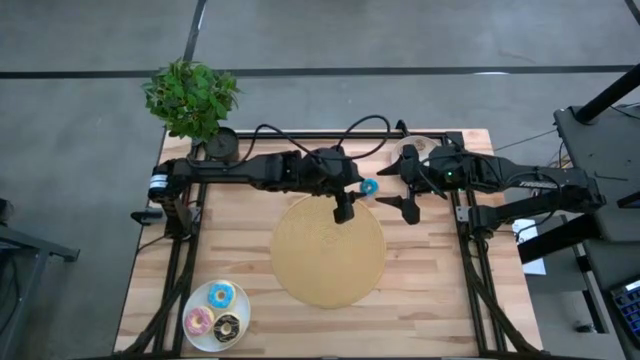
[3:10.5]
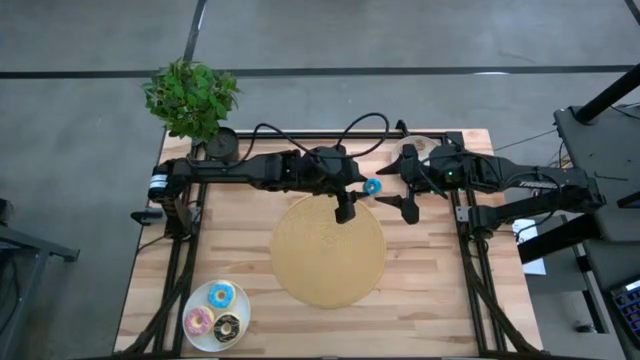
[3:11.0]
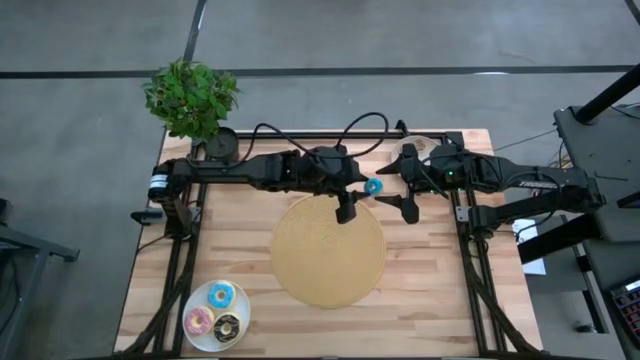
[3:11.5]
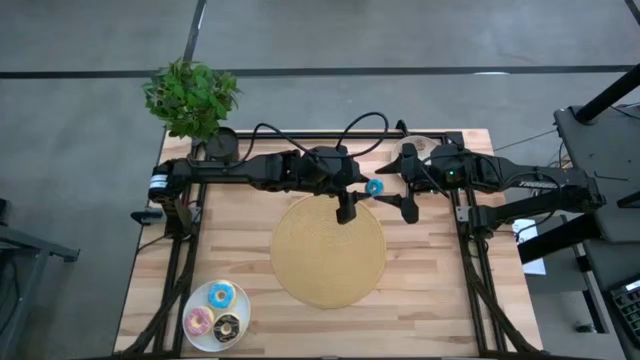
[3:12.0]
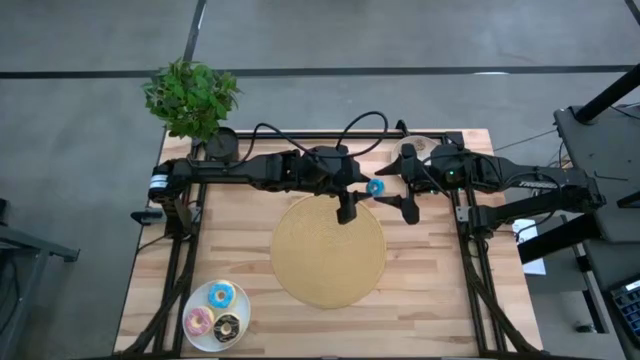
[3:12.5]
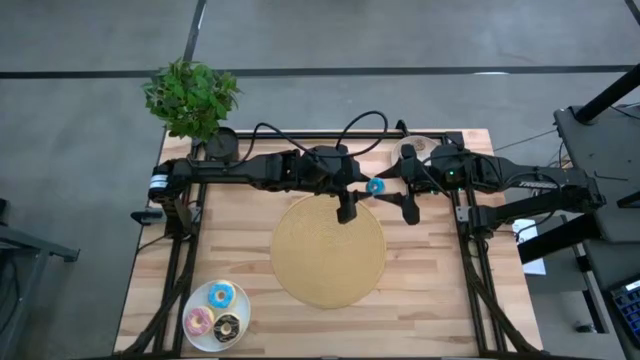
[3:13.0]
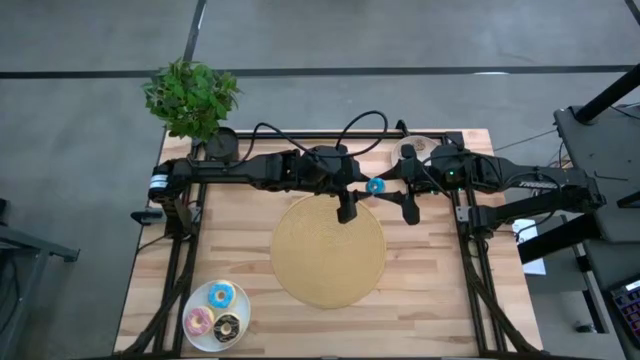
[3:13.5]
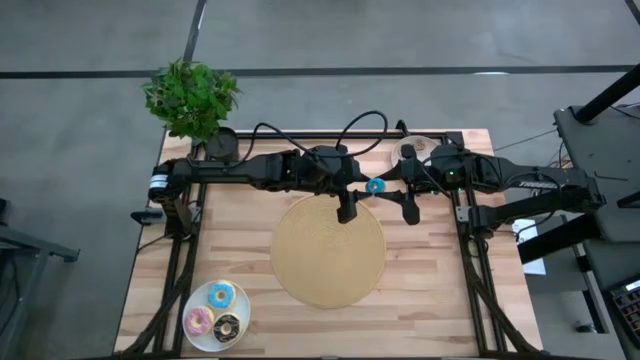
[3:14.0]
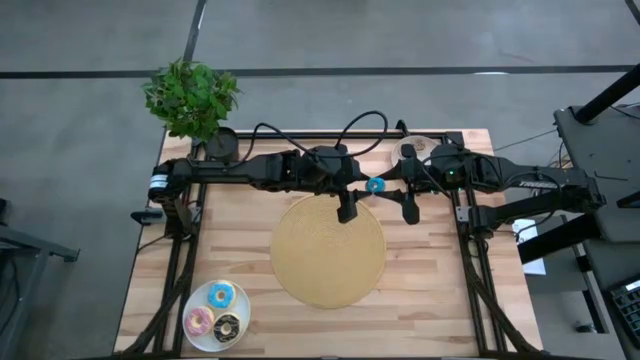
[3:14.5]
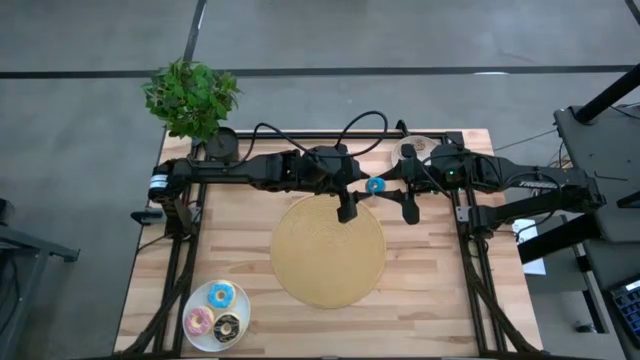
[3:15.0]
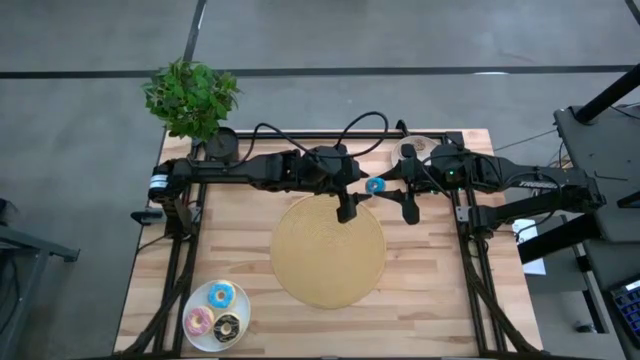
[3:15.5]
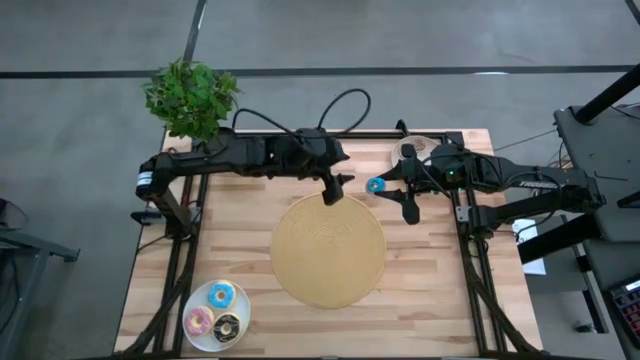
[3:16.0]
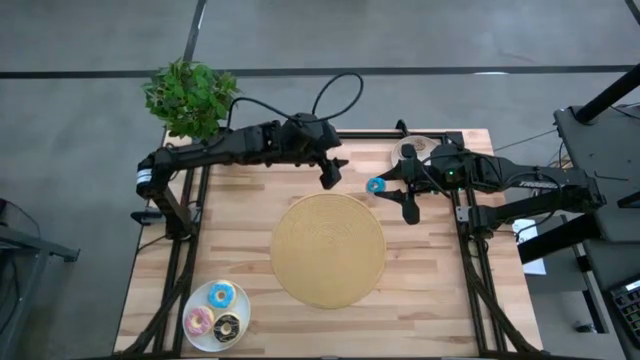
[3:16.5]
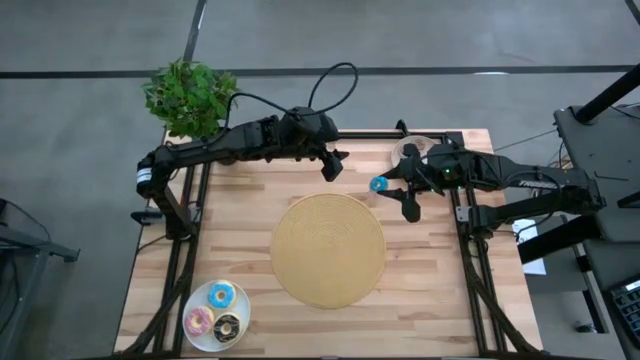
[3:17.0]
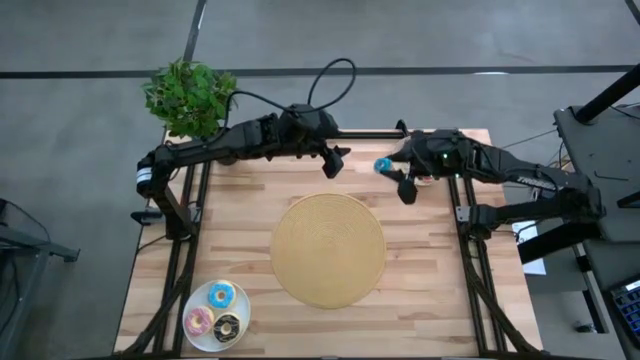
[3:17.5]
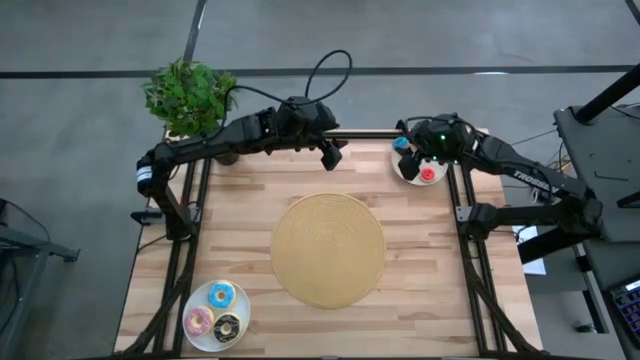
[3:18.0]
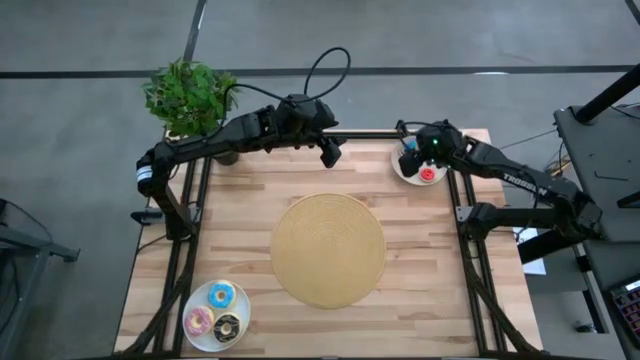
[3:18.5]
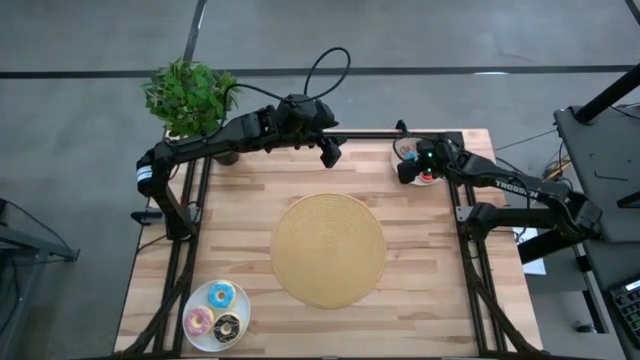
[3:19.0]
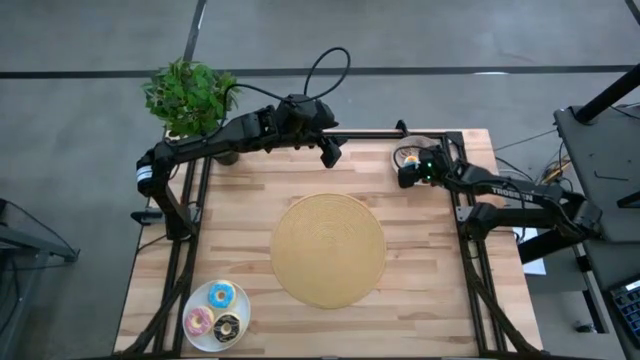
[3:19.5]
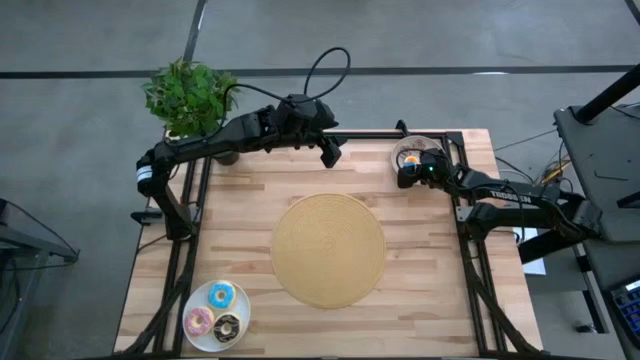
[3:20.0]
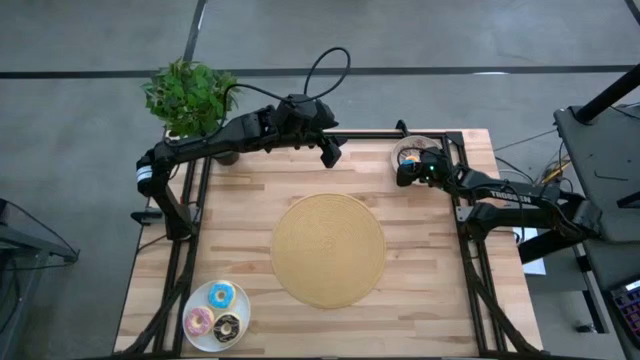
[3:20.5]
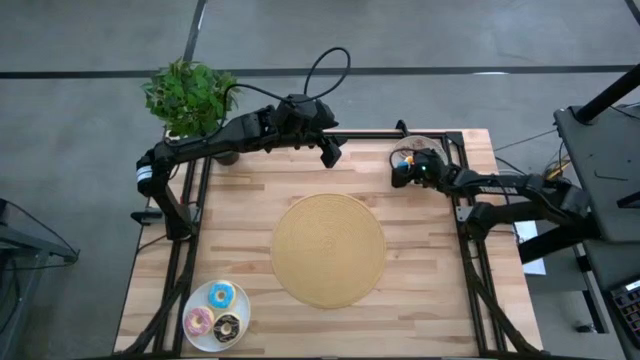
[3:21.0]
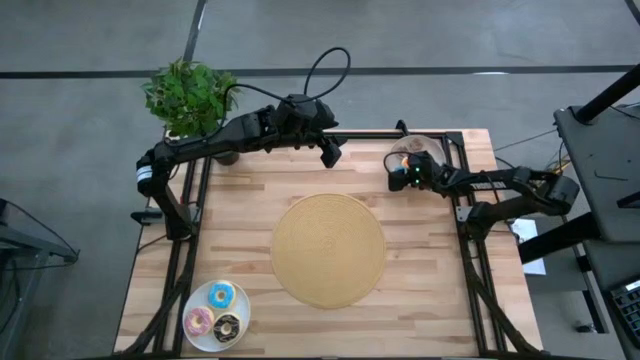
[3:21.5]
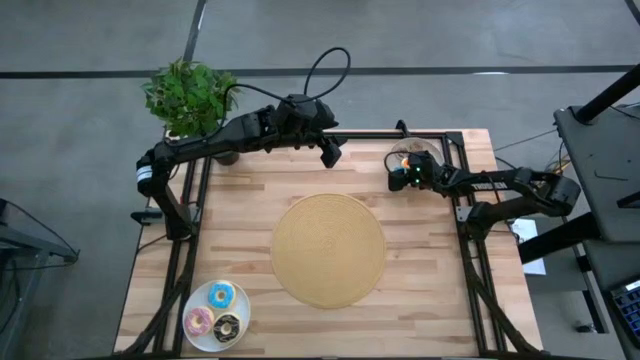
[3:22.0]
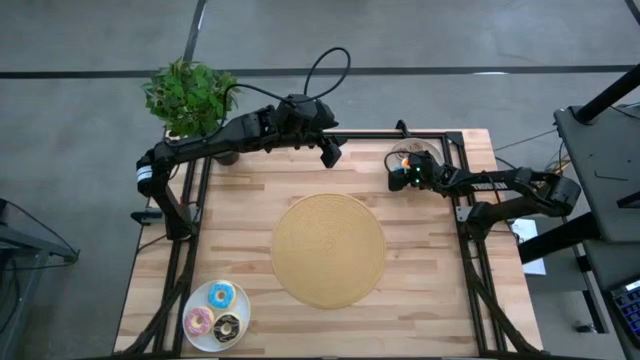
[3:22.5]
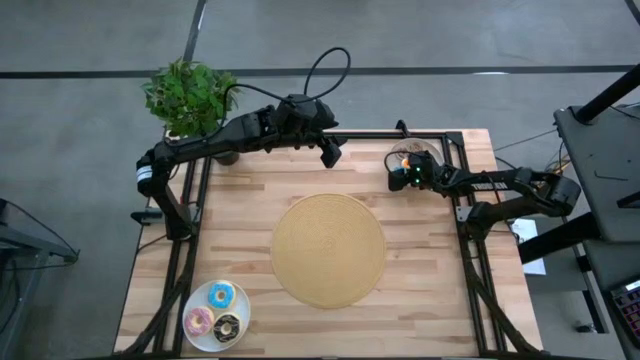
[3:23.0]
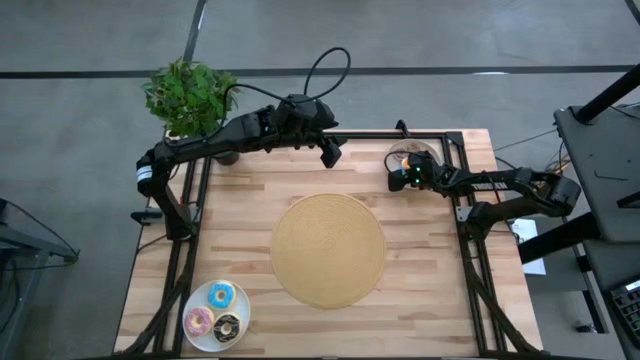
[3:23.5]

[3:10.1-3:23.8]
Task: Pick & Place donuts
Put the small blue donut on the gray plate

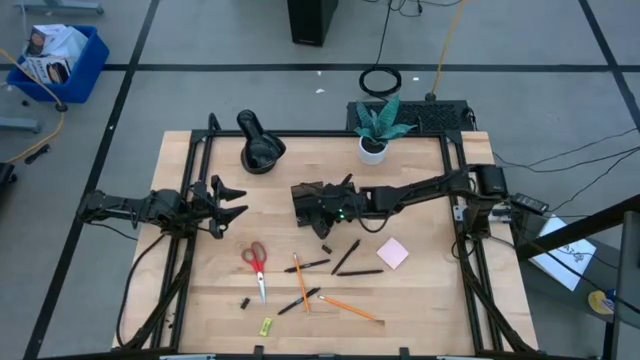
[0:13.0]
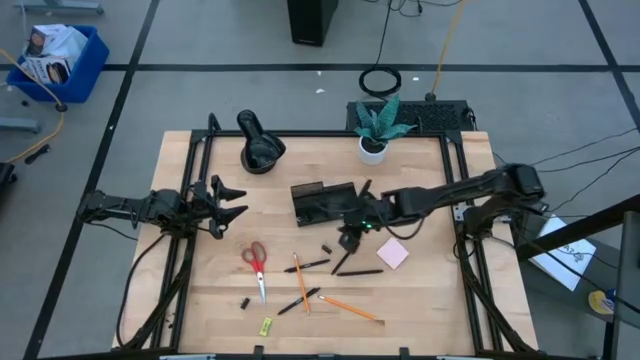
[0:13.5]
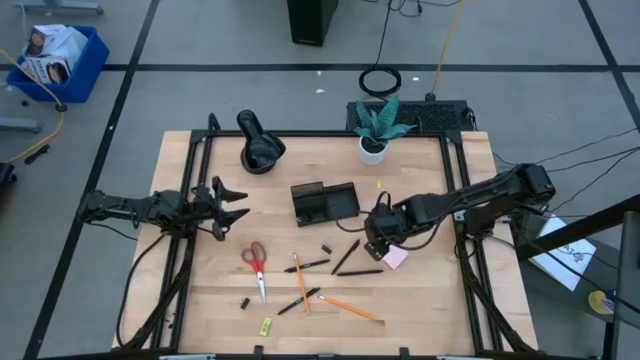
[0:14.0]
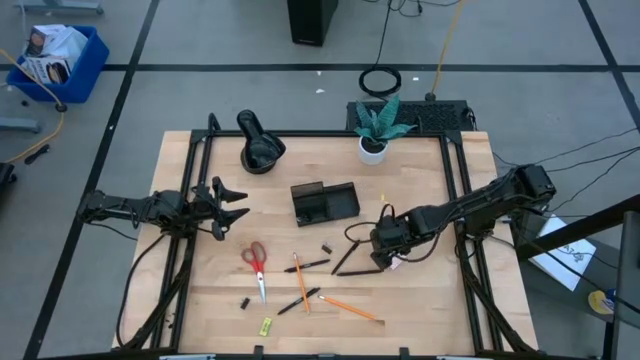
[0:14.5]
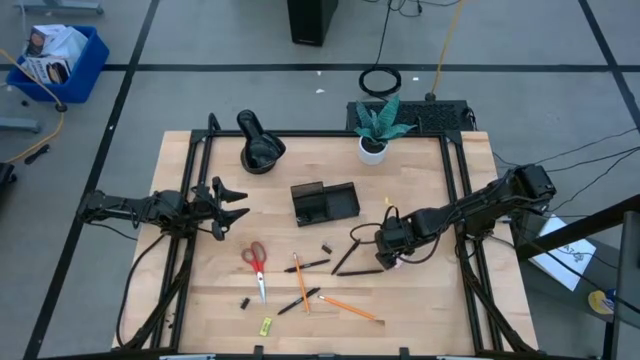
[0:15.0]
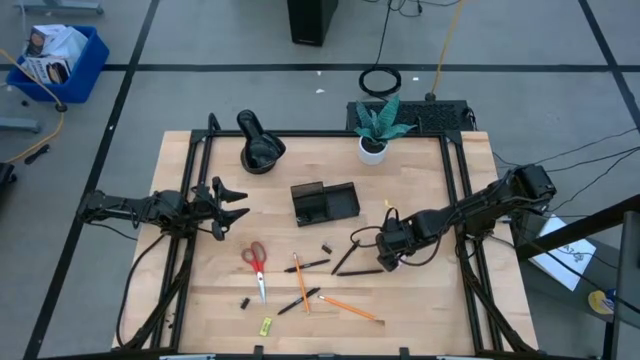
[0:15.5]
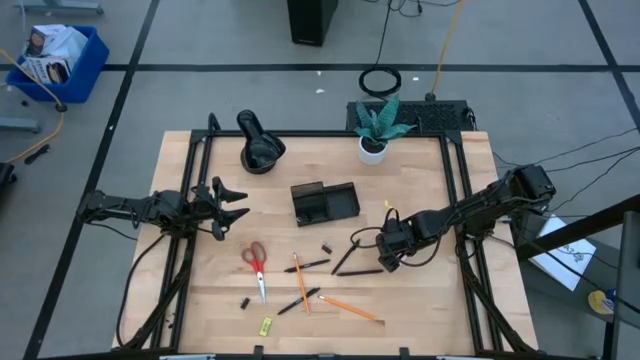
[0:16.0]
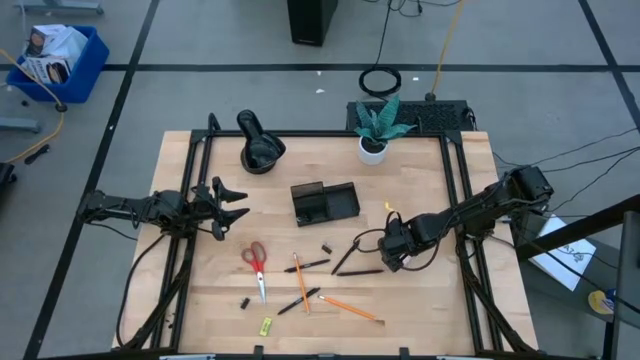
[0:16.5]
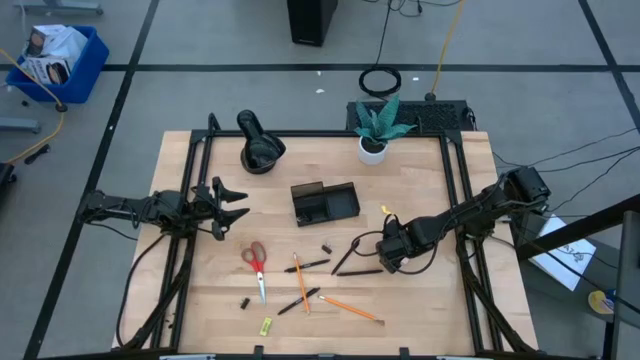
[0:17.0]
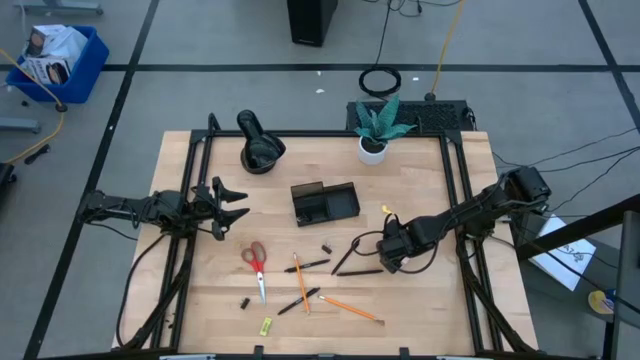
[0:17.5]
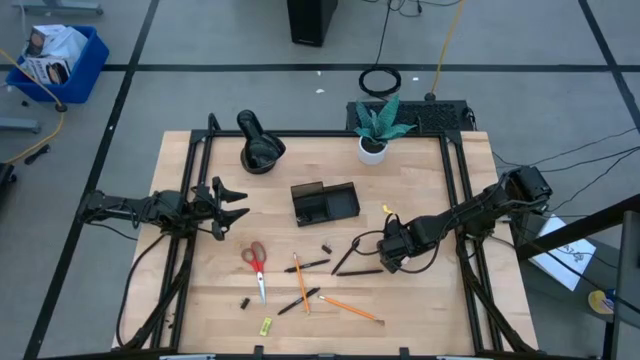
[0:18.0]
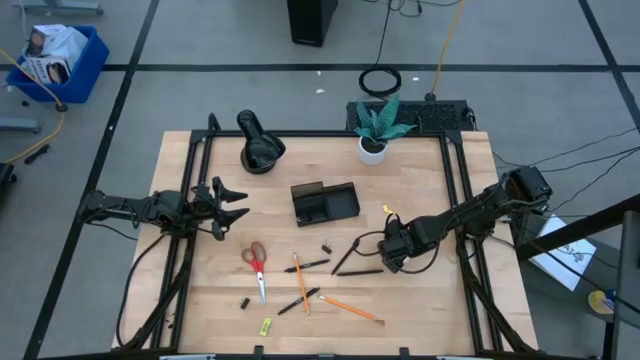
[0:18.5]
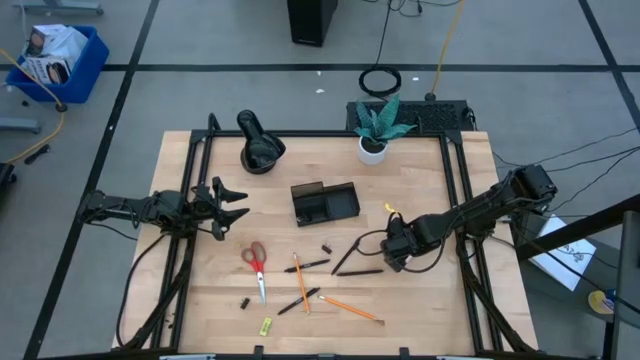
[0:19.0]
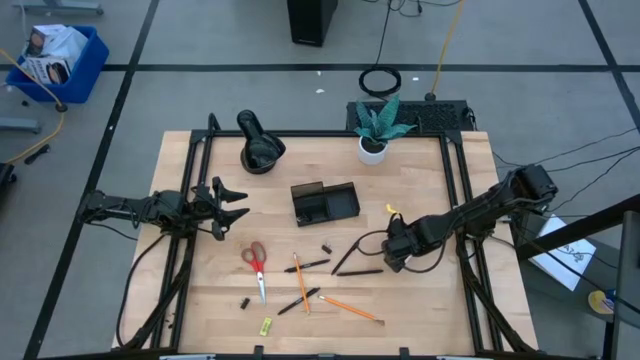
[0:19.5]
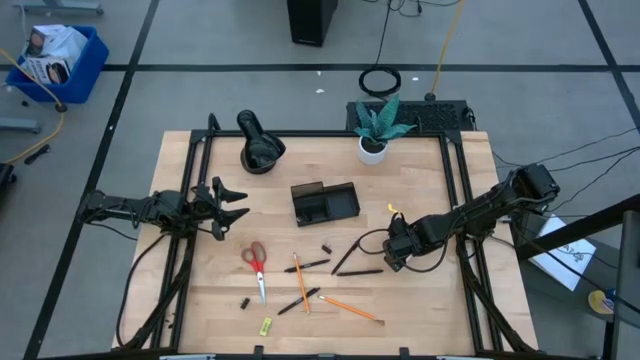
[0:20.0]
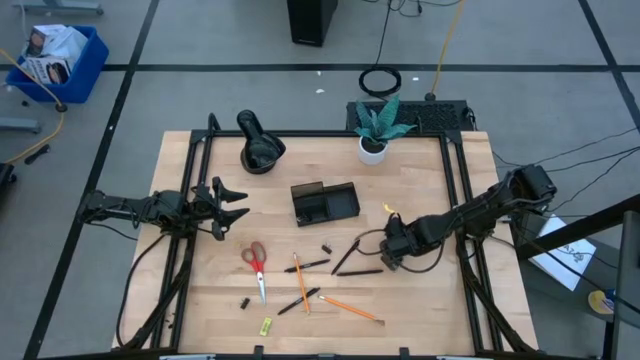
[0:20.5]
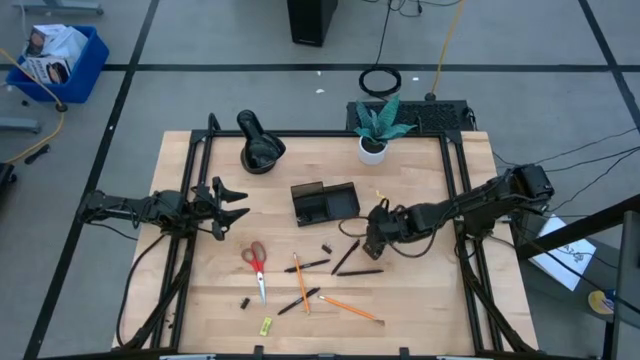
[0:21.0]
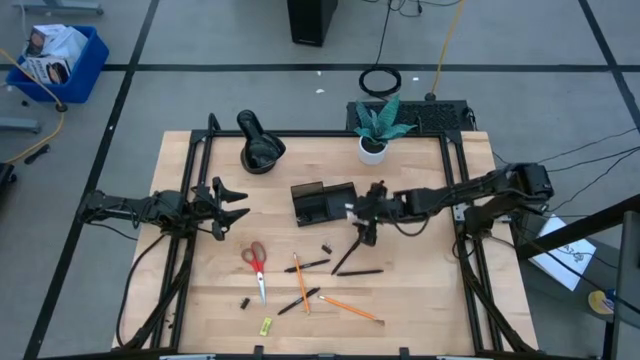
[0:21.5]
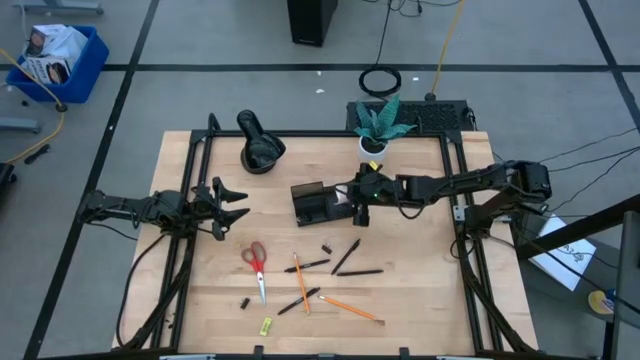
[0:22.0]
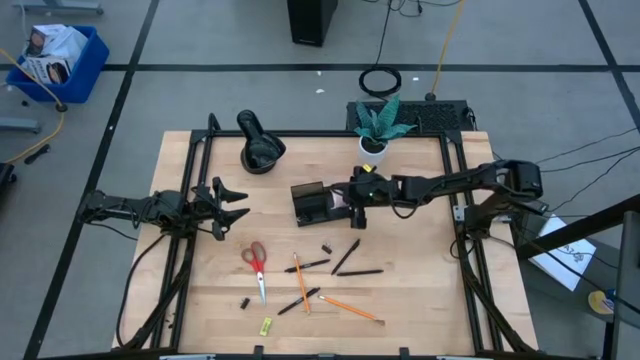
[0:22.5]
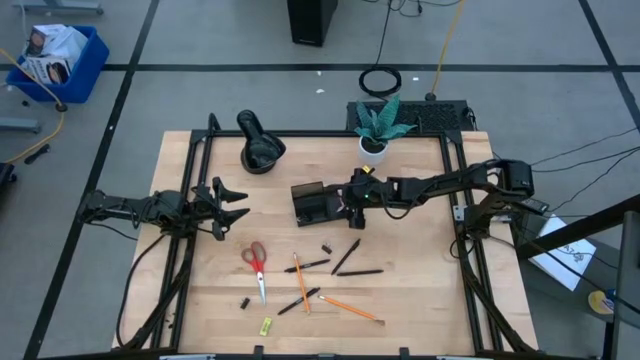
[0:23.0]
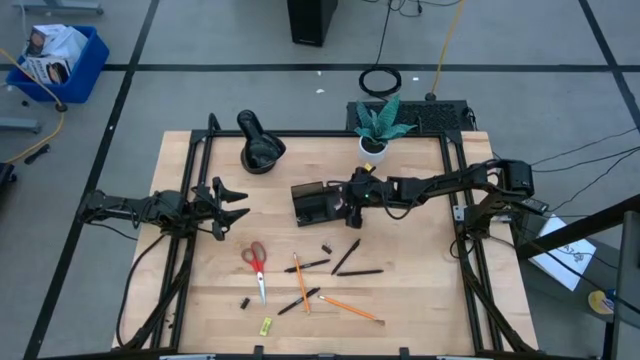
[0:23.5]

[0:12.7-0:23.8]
Task: Pick and place office supplies into organizer
Put the pink sticky notes into the desk organizer
